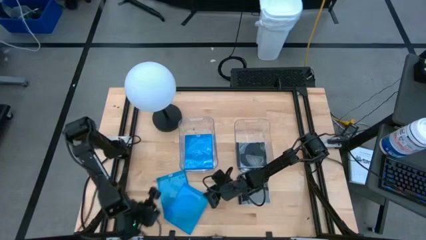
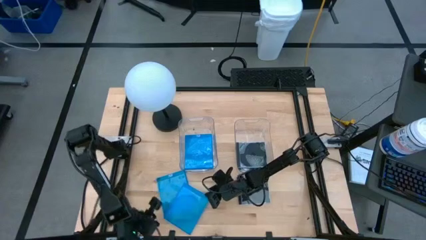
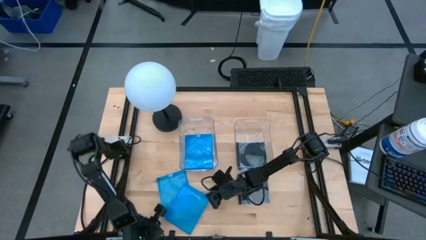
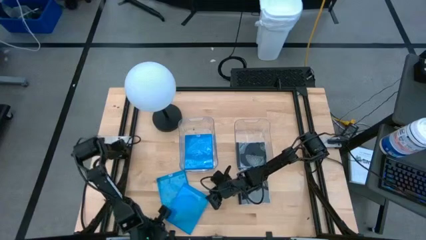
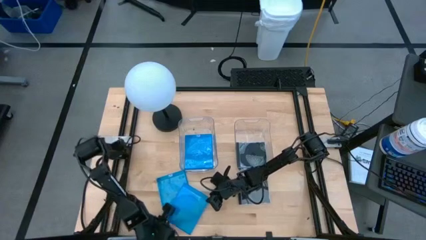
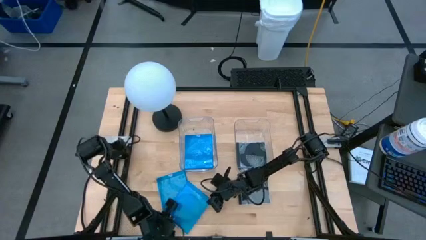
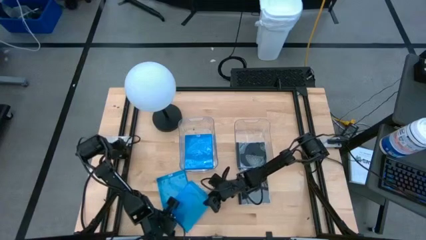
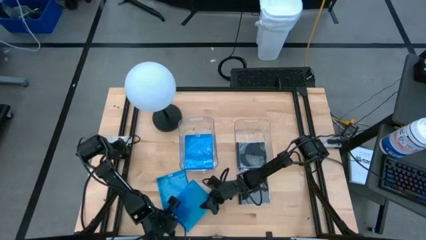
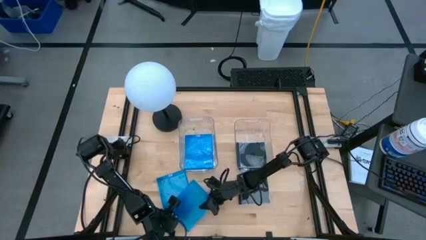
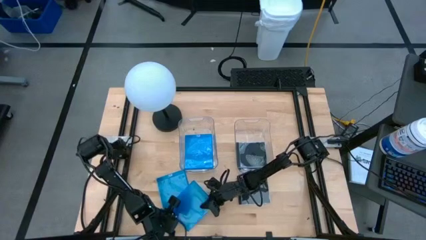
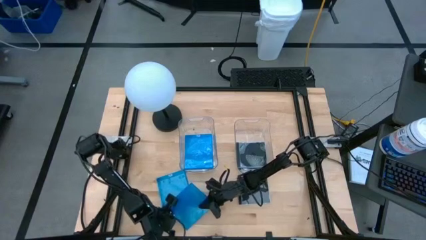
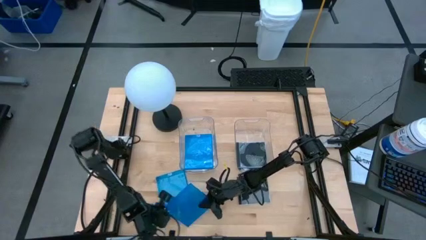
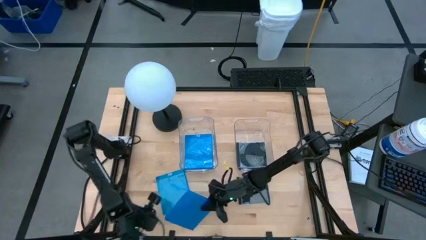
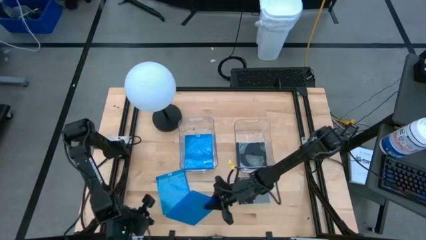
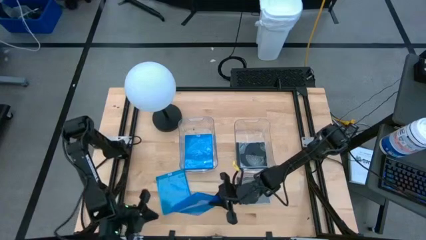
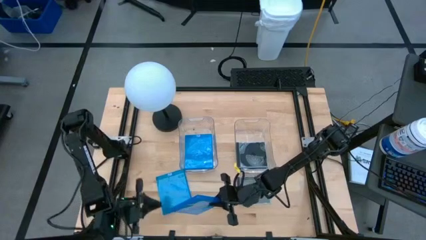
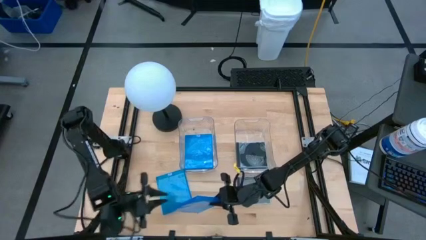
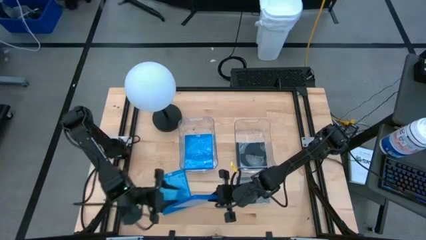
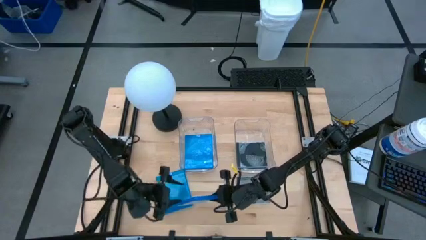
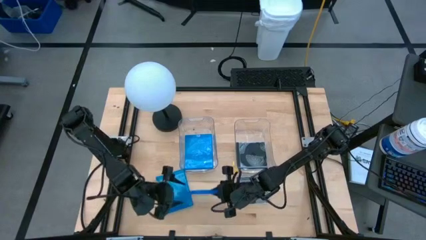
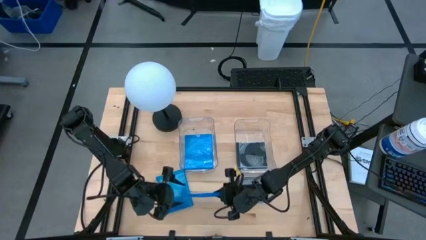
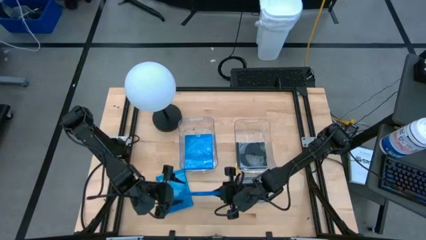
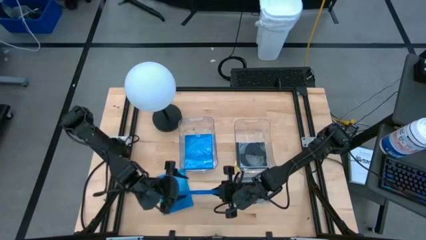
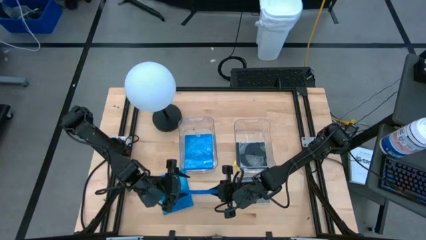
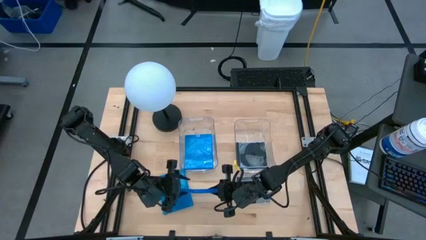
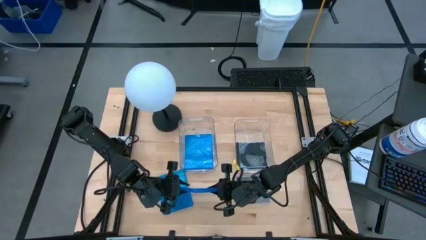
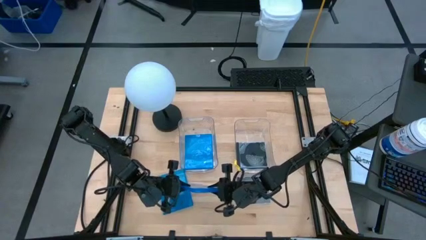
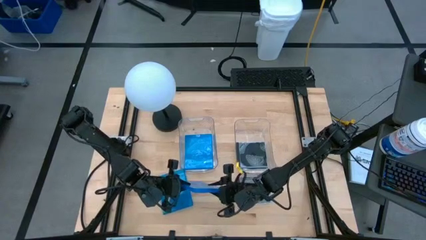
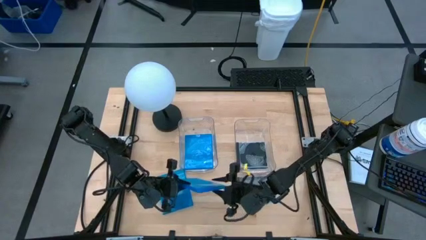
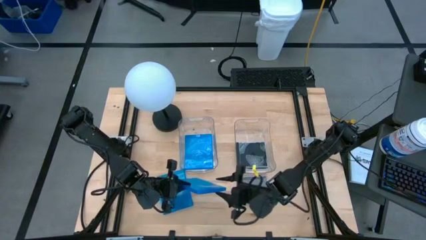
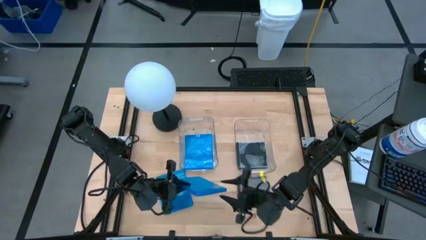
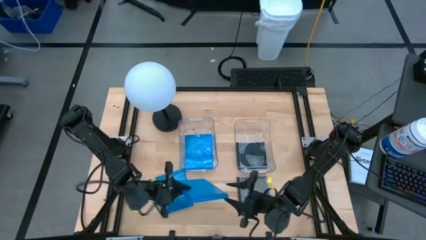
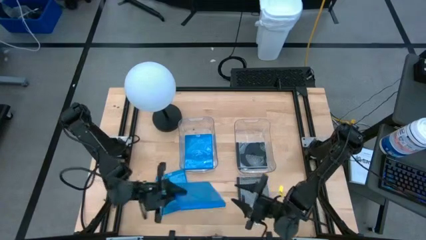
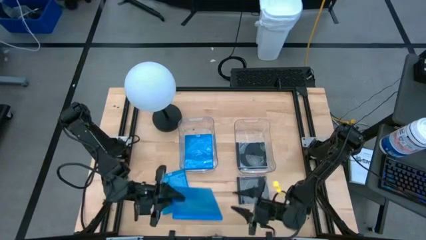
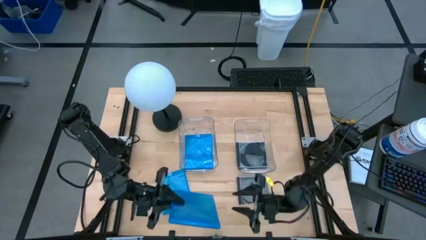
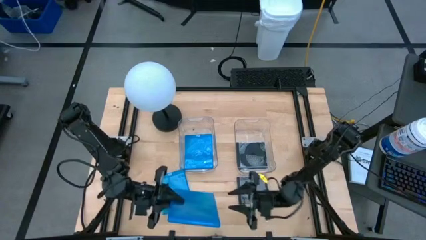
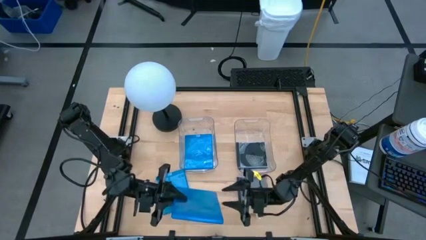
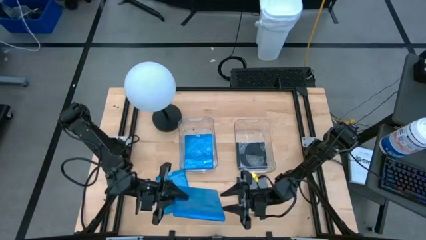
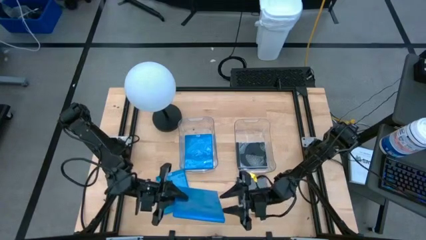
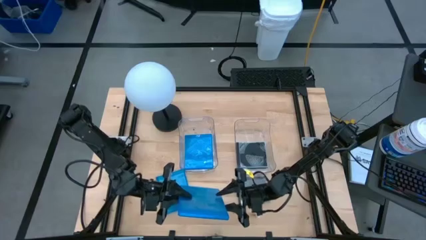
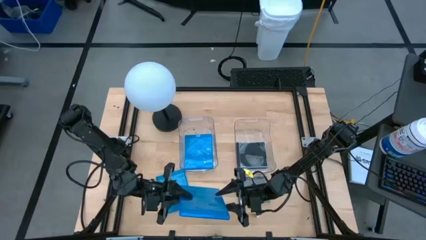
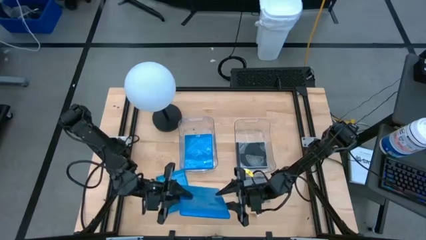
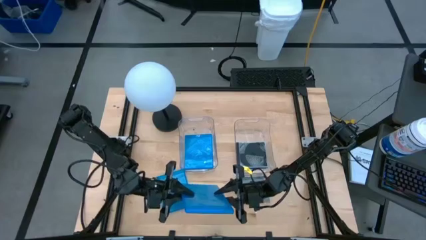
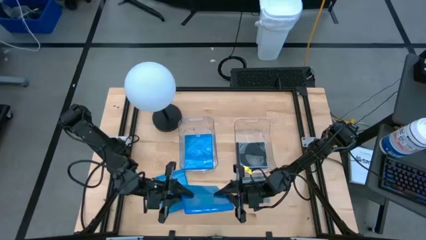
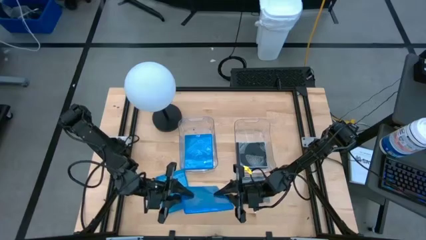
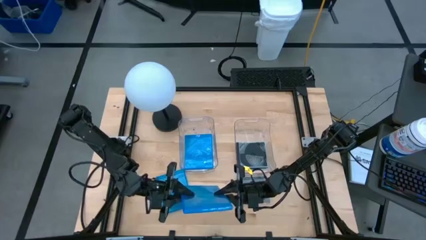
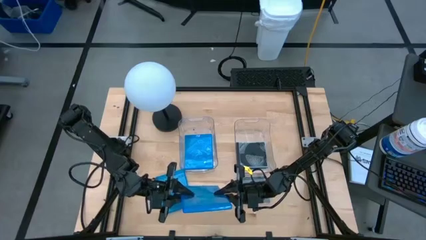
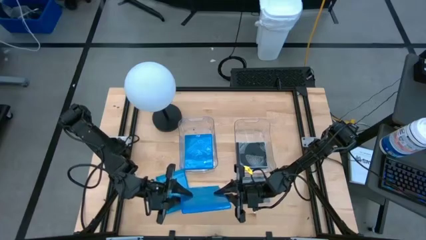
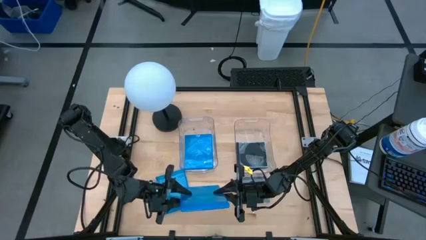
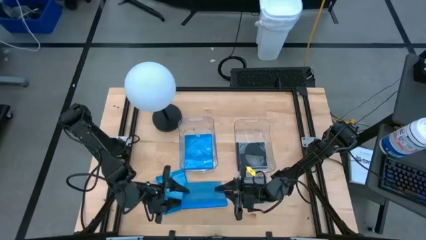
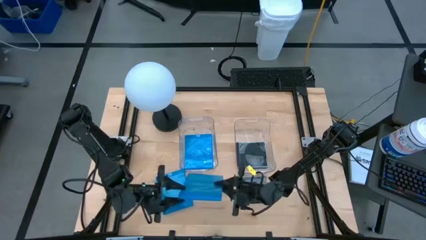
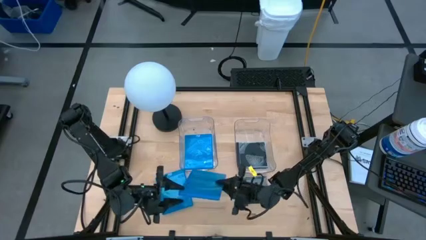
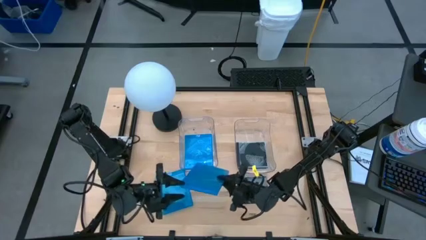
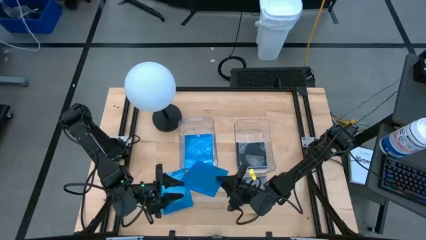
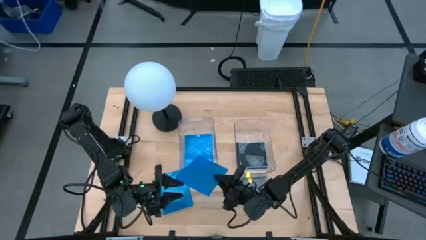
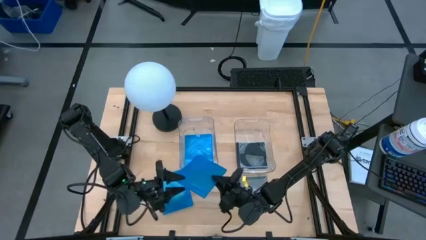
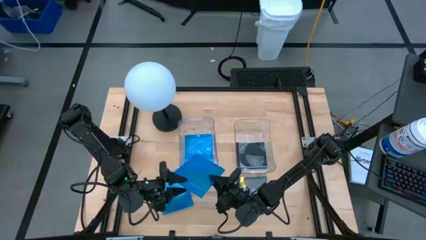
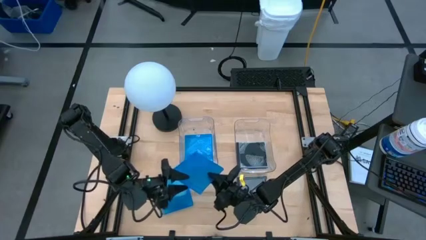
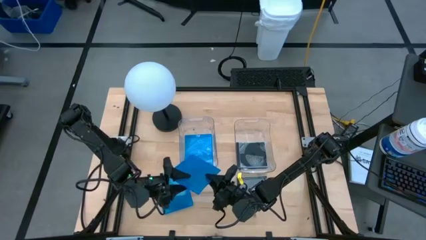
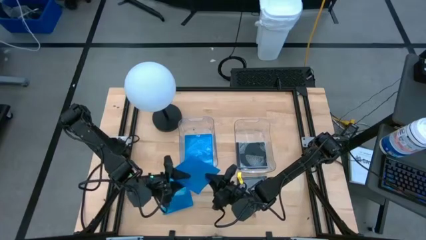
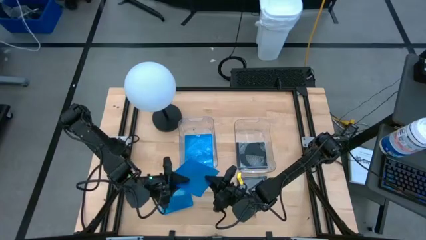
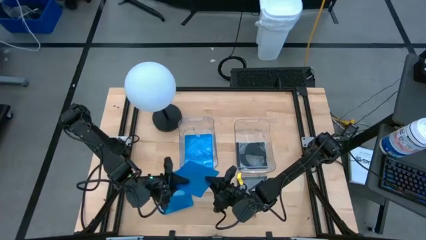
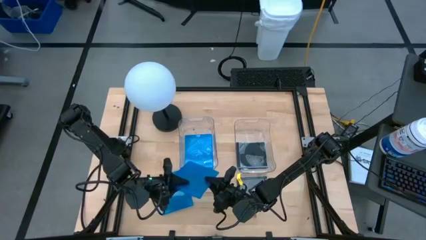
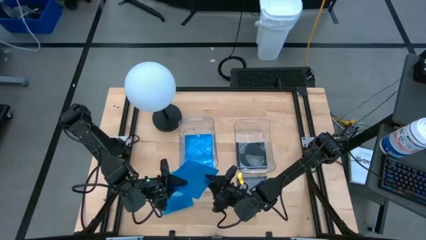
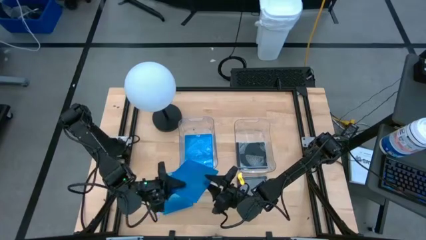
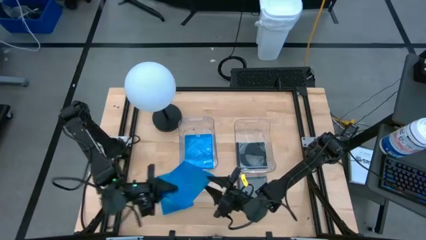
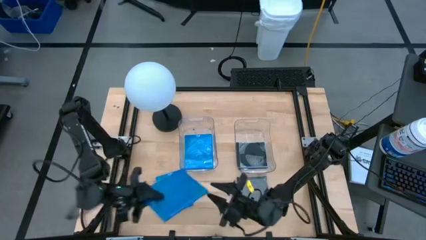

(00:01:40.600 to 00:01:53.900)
Task: Pick & place jewel cases by type
Put the blue CD case into the left transparent bin

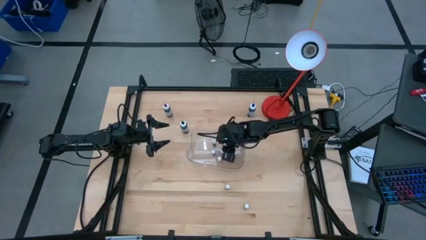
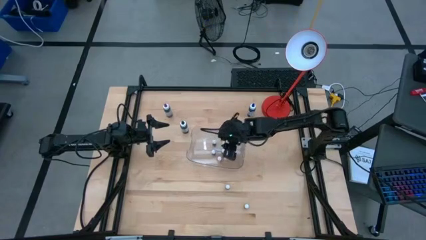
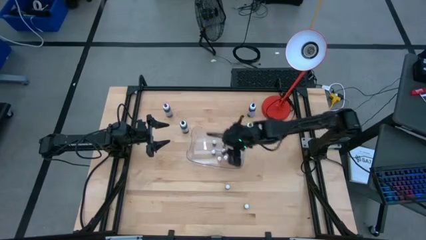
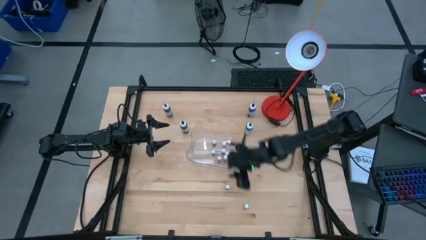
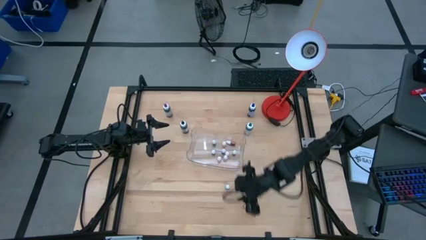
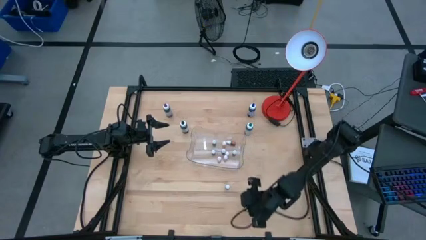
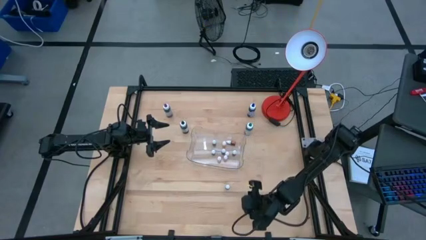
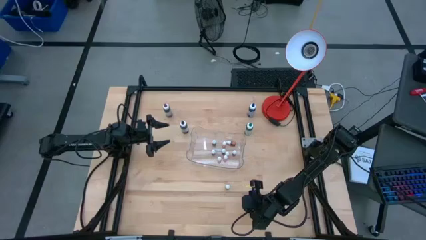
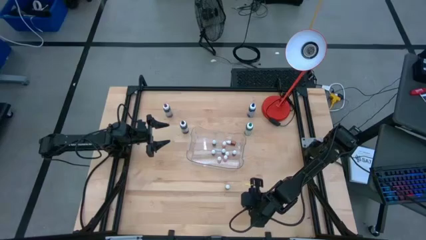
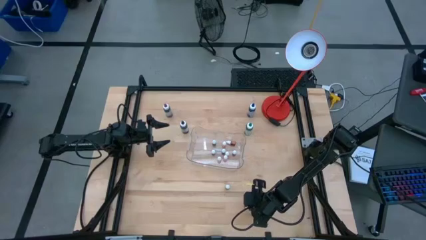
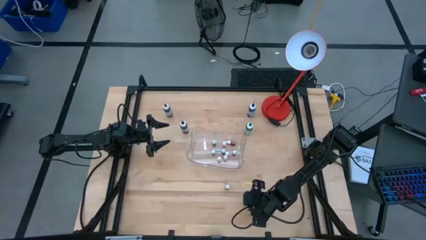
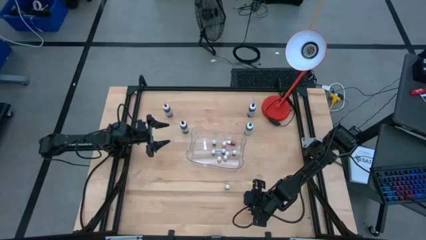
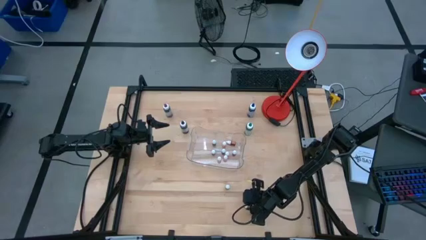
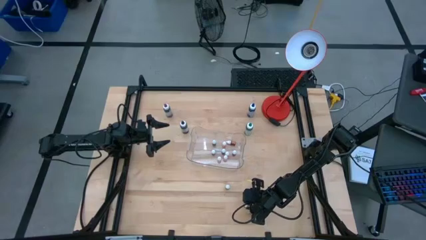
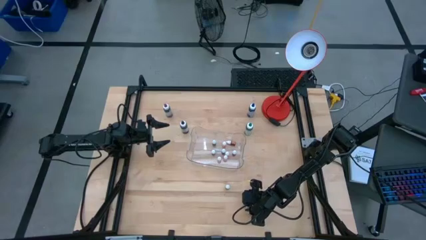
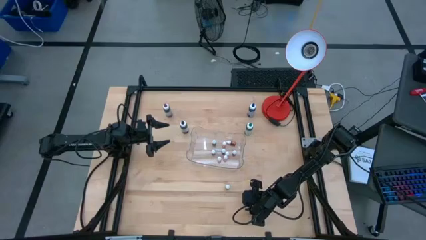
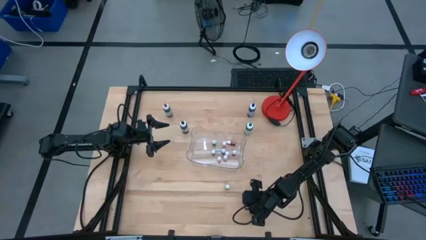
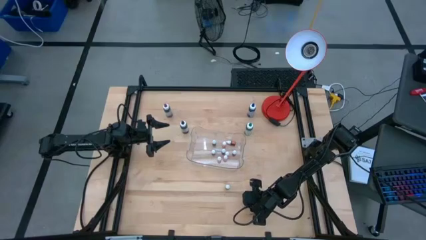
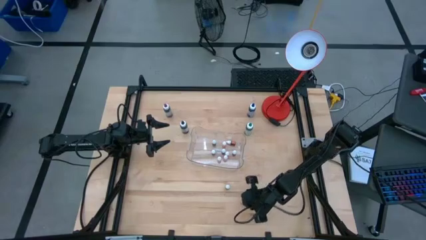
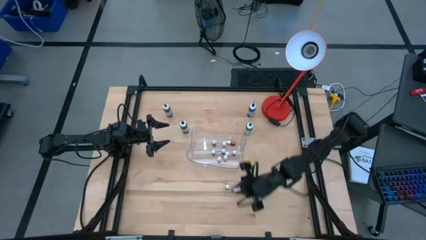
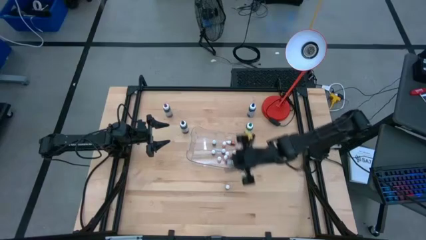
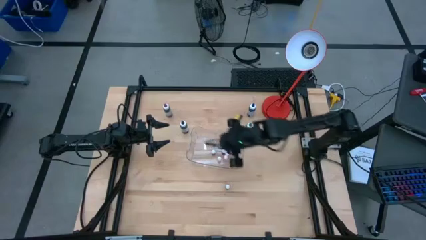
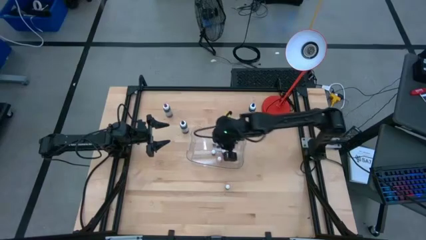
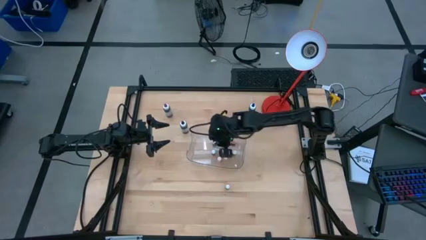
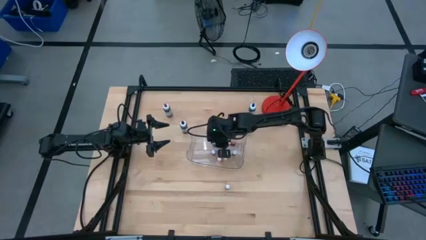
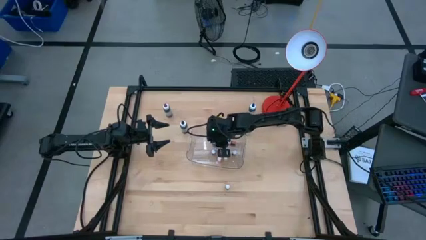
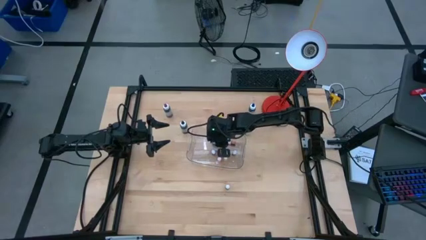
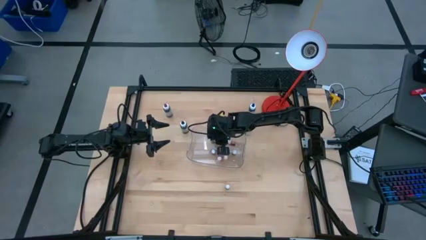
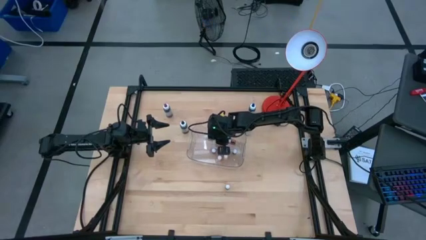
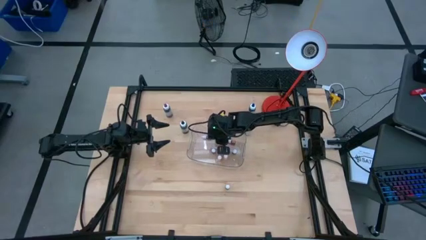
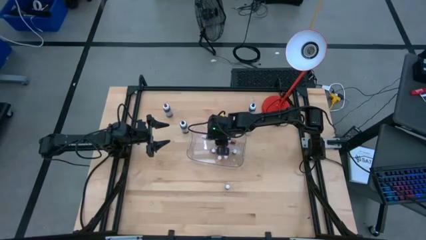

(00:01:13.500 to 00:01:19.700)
Task: Pick & Place food coloring
Put the small black food coloring bottle into the transparent bin
